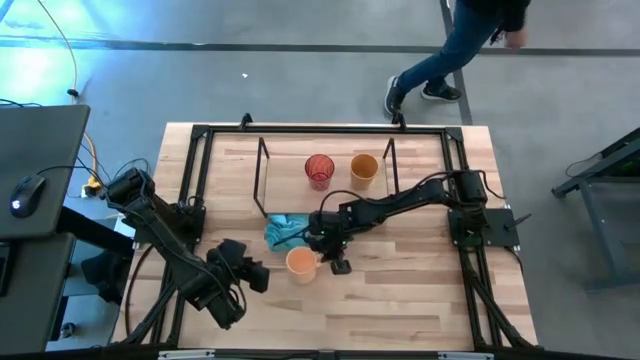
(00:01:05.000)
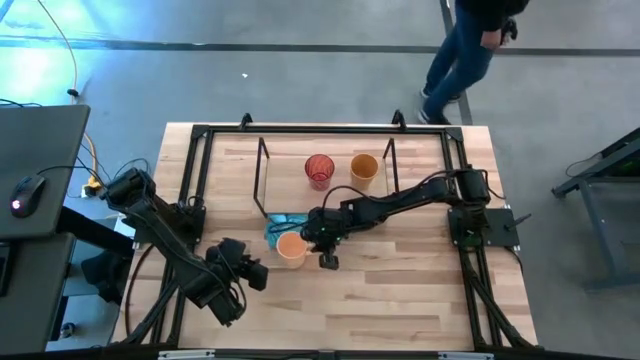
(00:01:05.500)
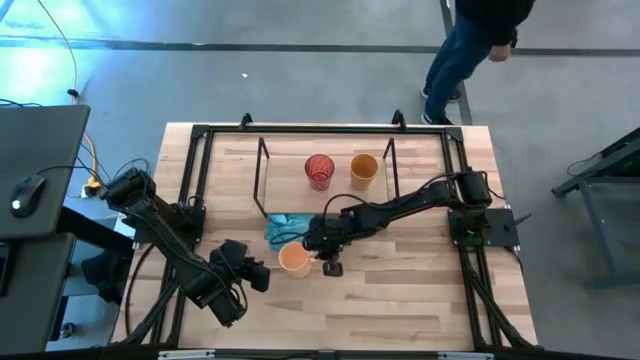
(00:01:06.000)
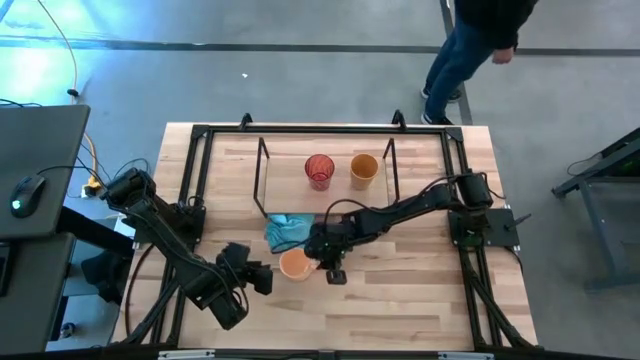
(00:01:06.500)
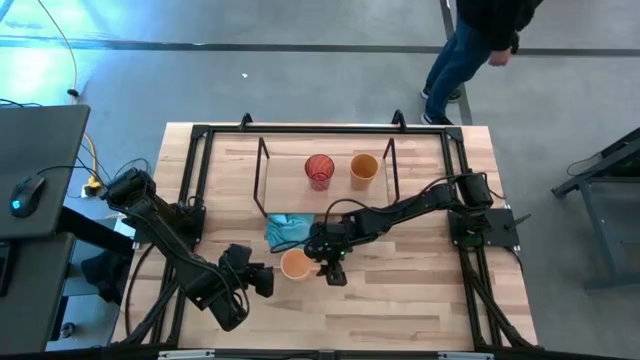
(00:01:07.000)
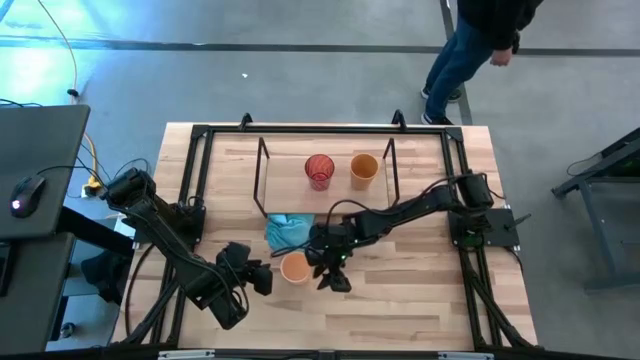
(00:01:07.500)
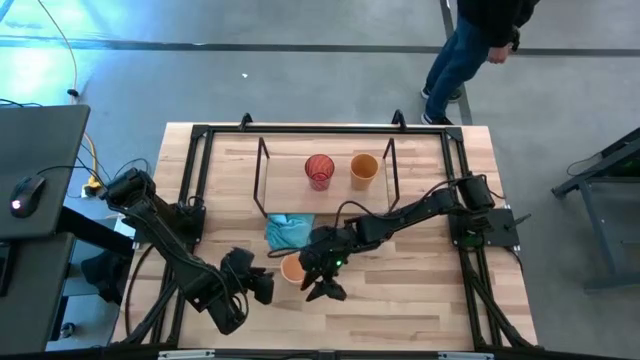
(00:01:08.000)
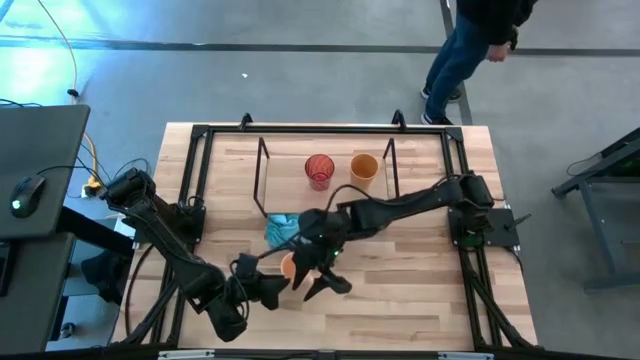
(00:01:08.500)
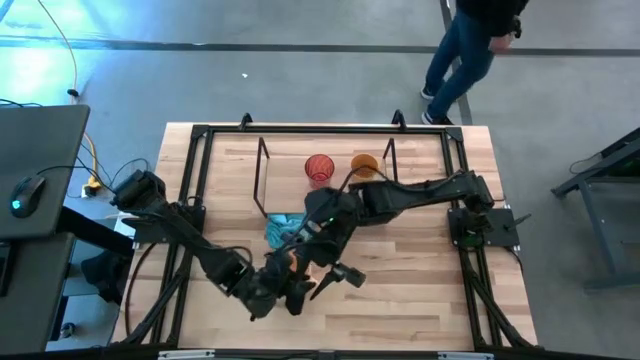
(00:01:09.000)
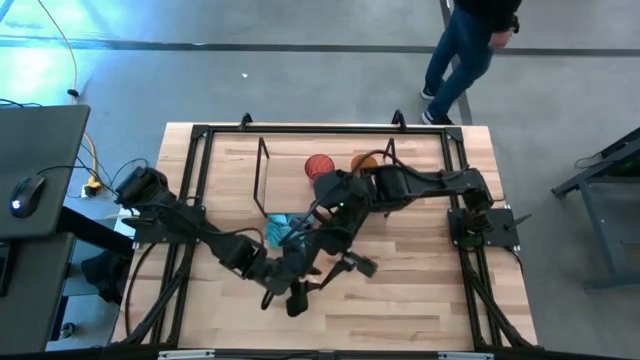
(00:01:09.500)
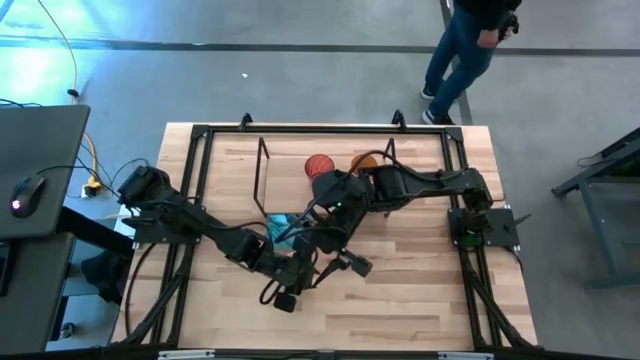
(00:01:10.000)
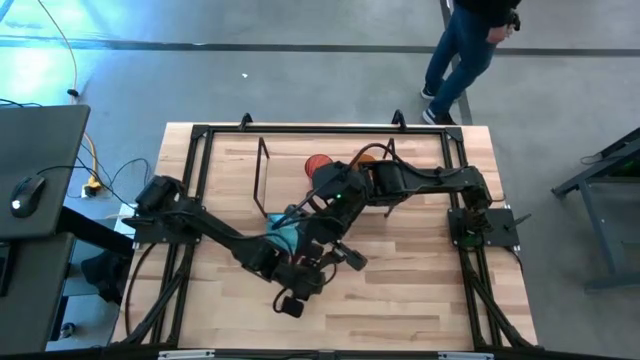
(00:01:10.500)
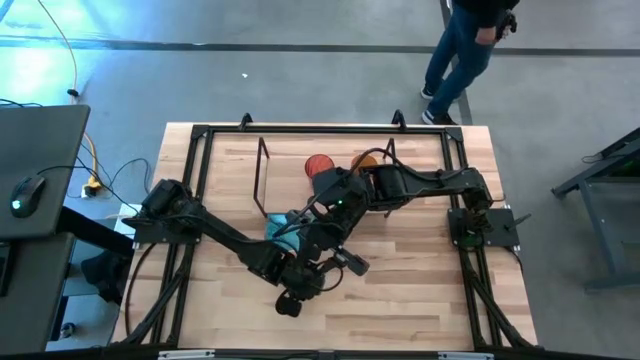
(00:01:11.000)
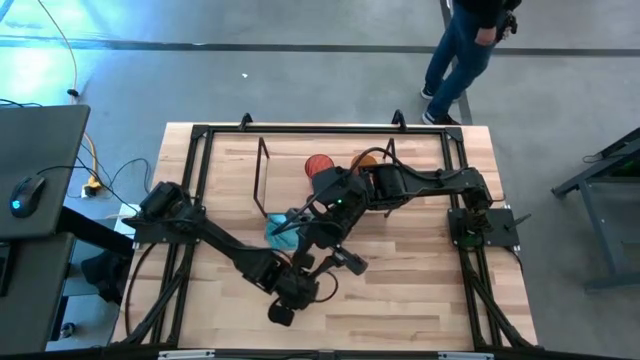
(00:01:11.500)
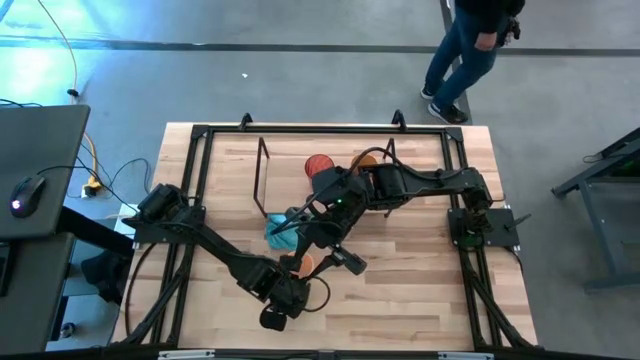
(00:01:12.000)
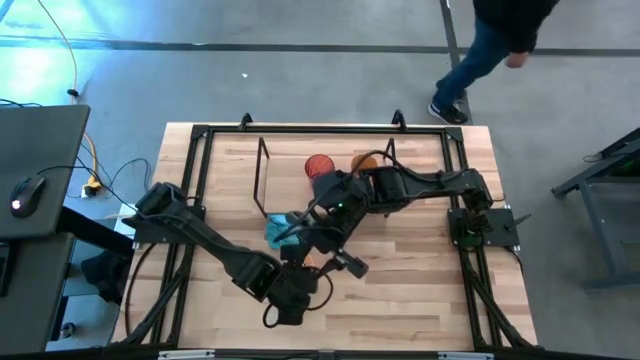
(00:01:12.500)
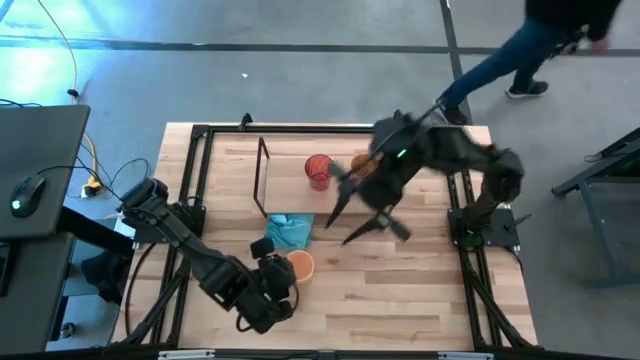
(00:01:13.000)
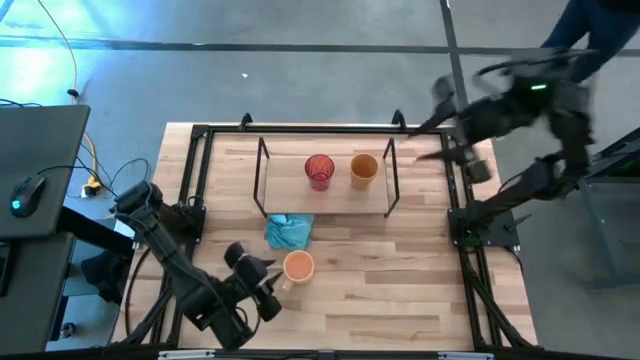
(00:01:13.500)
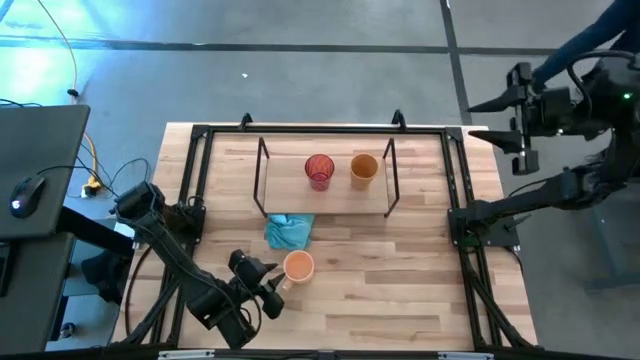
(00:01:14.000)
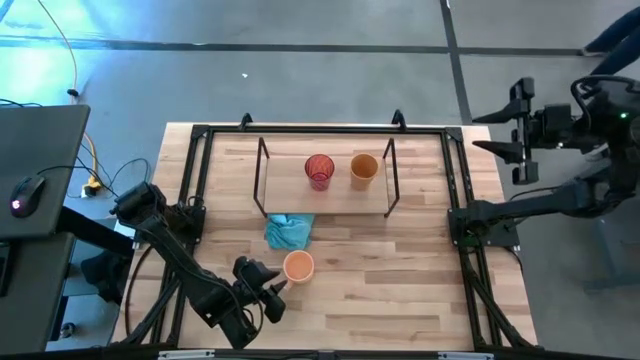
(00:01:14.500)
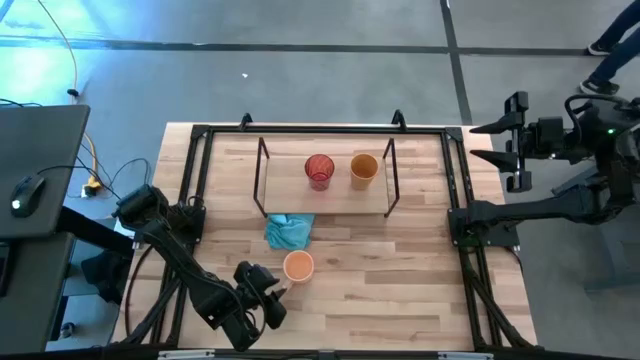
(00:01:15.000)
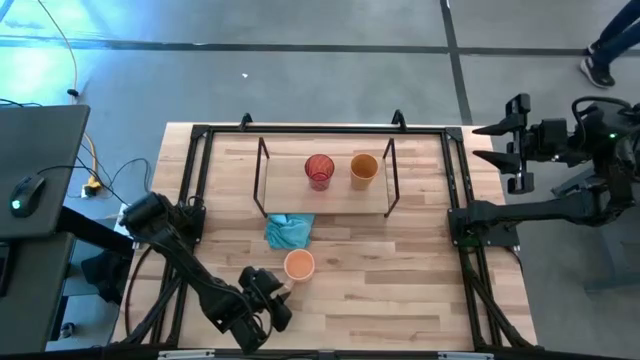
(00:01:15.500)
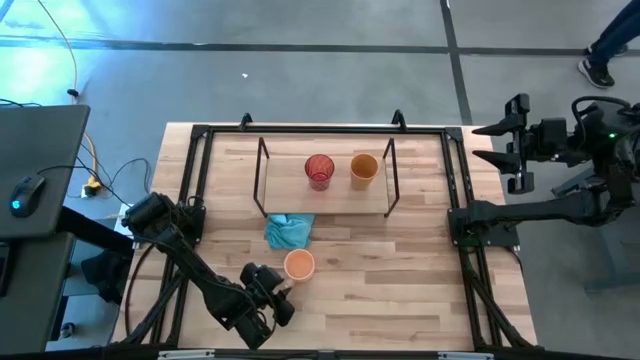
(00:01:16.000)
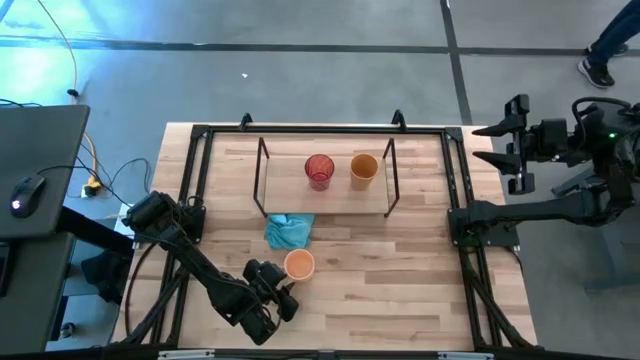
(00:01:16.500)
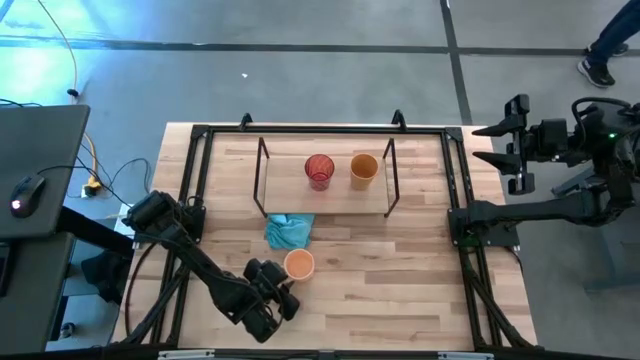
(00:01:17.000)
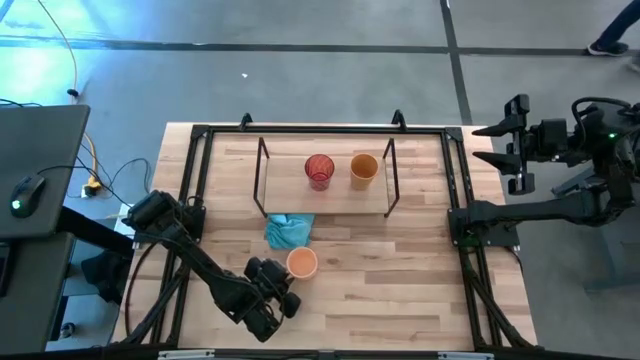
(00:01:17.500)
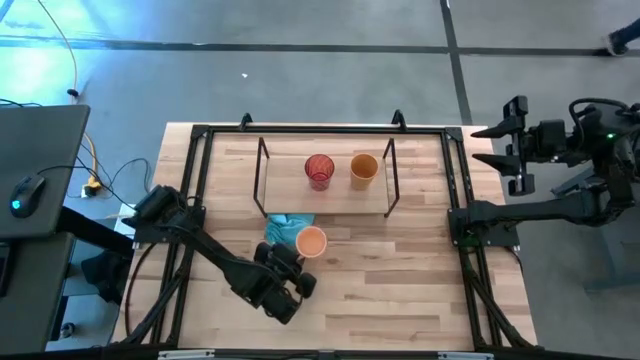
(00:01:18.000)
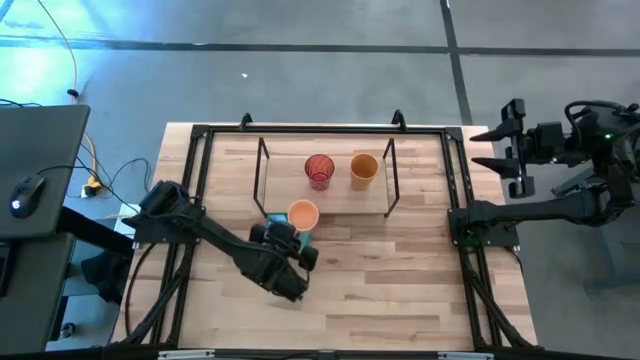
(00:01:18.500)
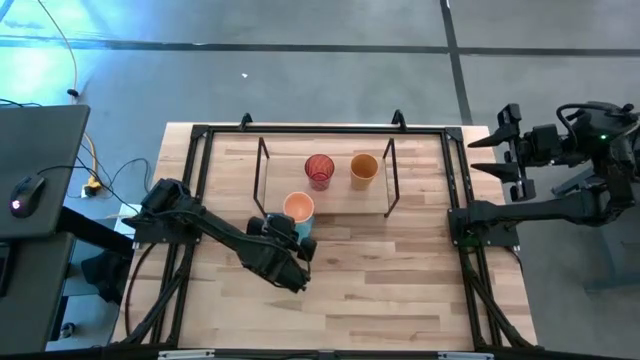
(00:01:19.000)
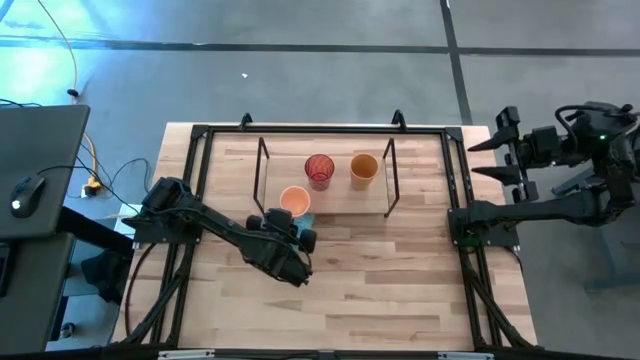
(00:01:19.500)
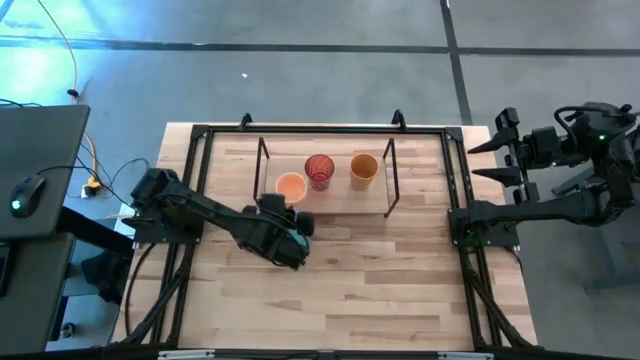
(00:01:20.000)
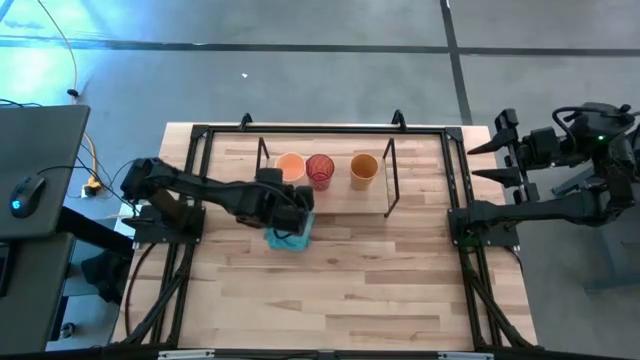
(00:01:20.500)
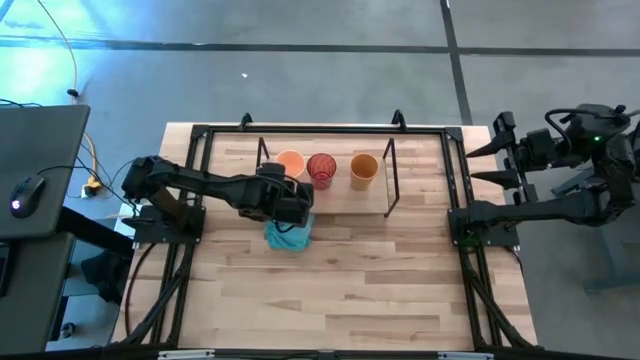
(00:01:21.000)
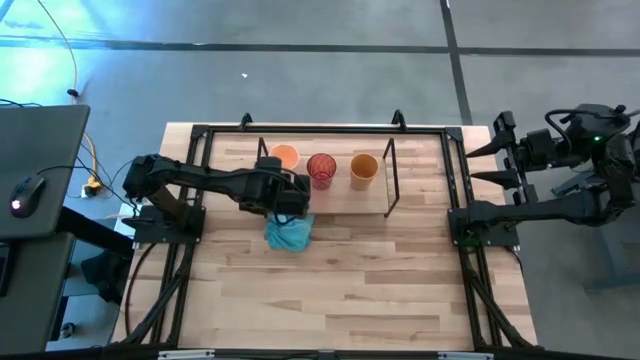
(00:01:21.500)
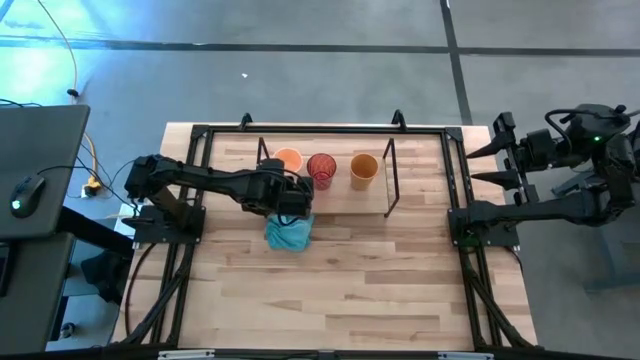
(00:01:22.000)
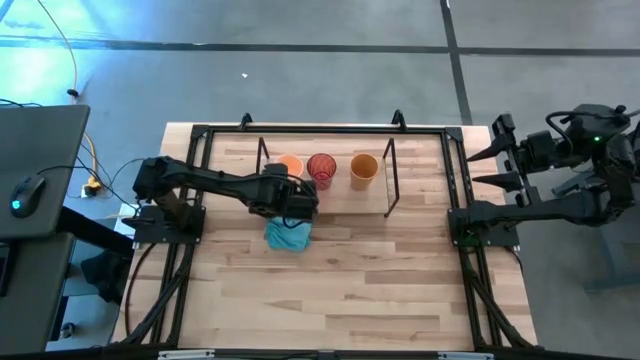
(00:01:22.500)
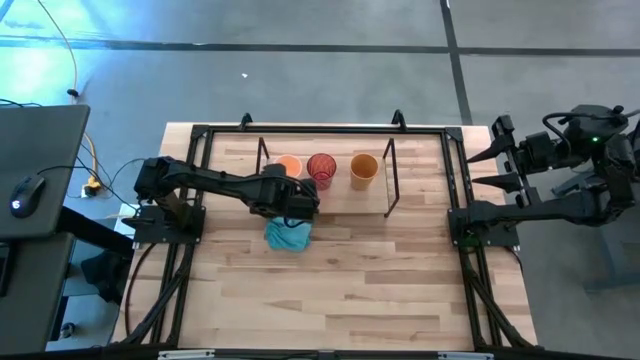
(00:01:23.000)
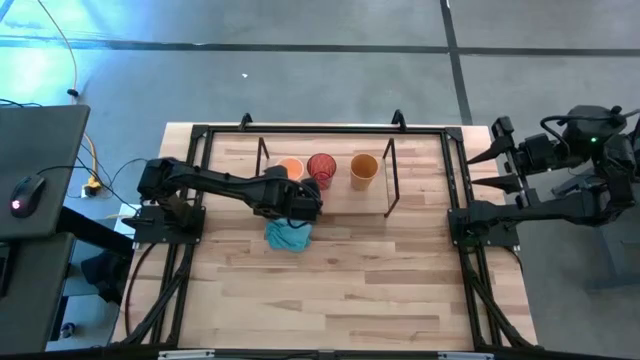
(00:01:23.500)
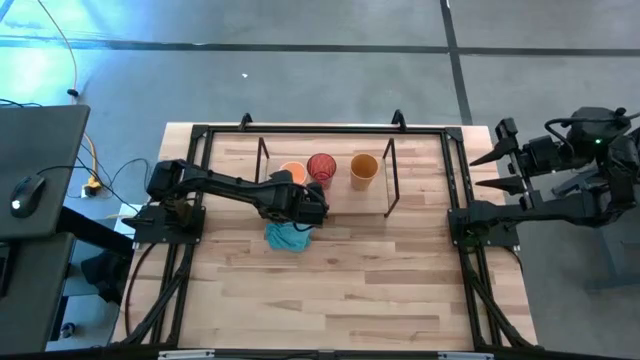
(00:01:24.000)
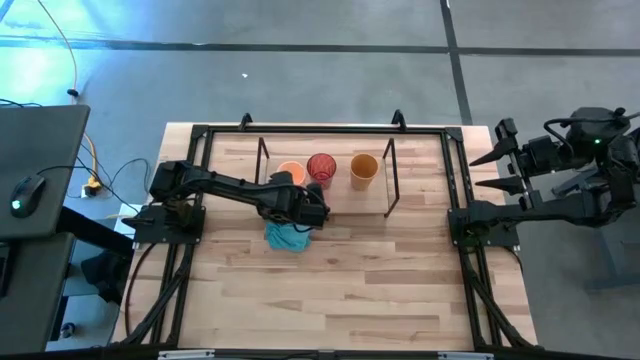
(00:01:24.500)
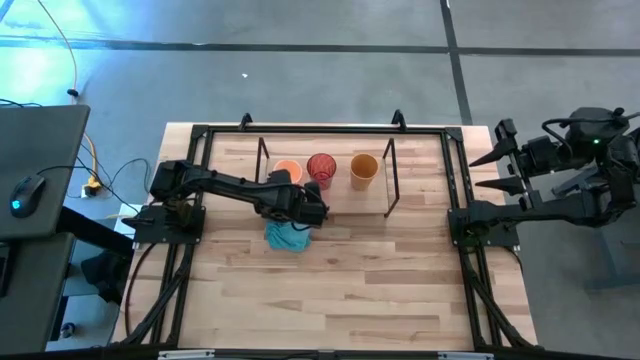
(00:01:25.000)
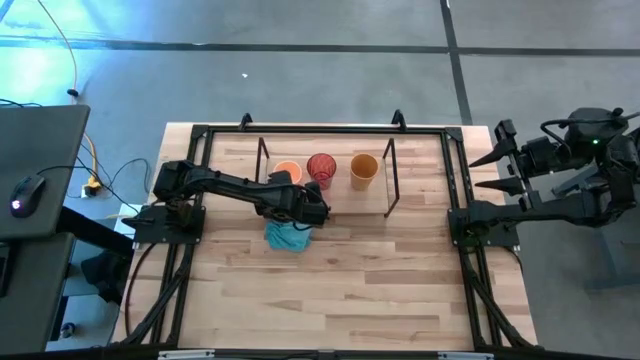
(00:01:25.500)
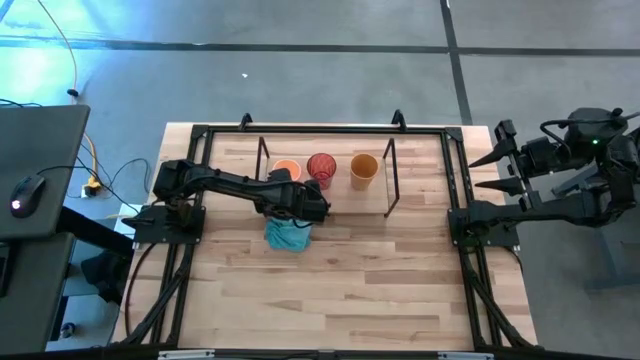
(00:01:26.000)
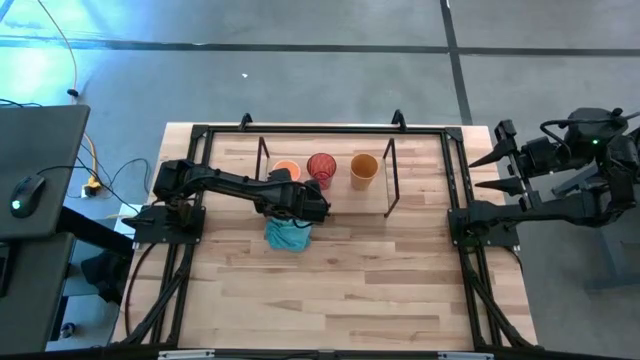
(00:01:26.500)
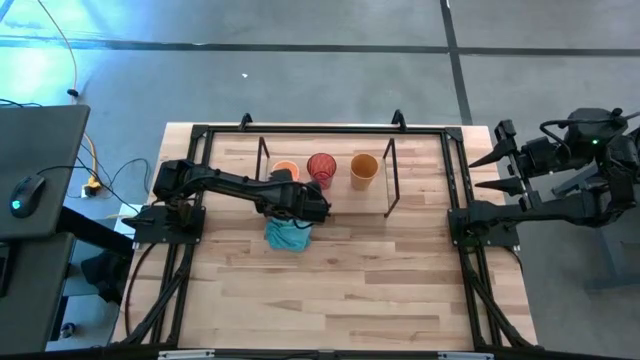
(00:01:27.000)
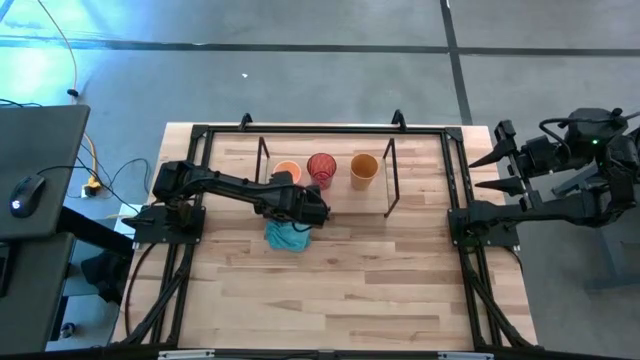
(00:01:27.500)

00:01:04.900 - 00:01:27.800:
Task: Stack small to large cups/mugs on shelf
Put the light yellow mug on the shelf
